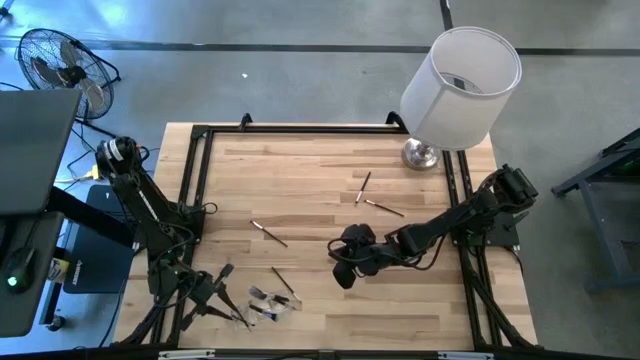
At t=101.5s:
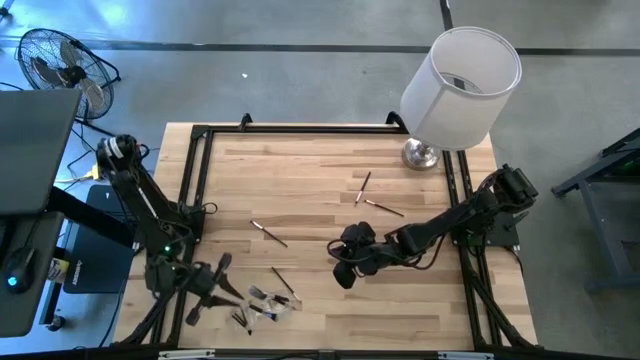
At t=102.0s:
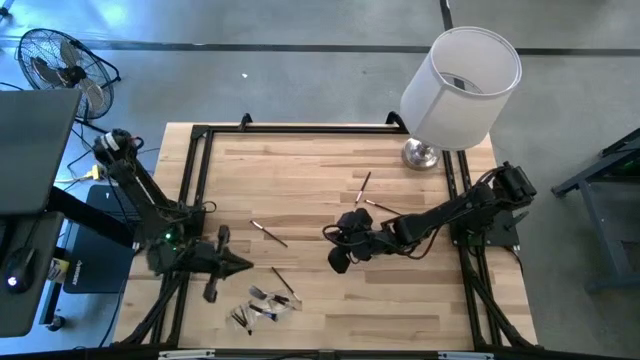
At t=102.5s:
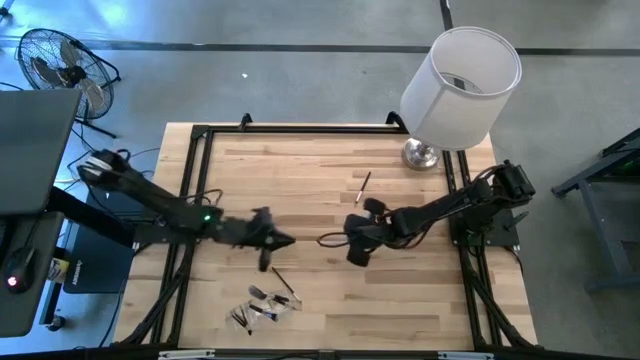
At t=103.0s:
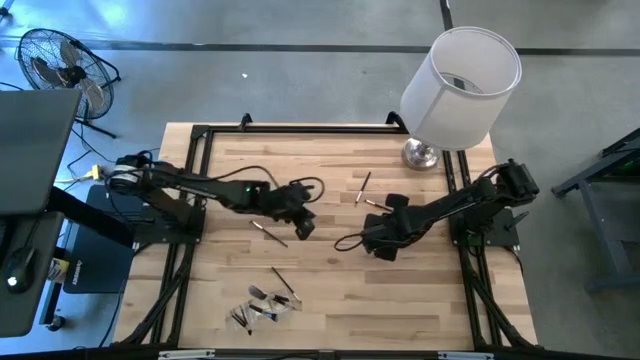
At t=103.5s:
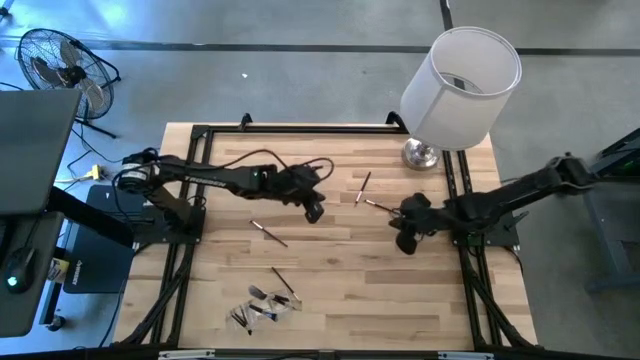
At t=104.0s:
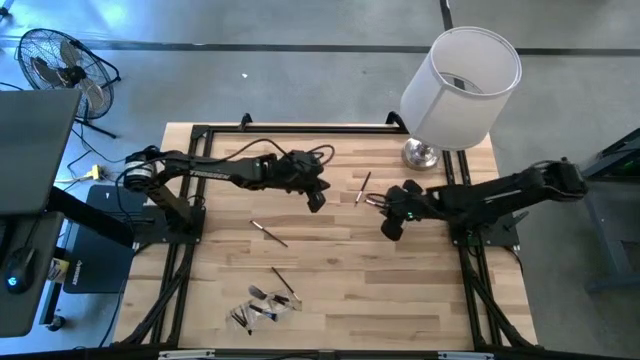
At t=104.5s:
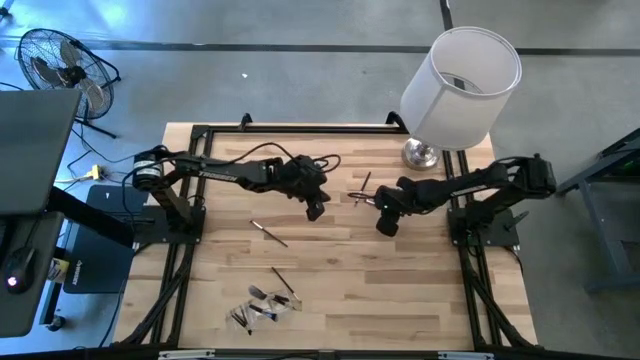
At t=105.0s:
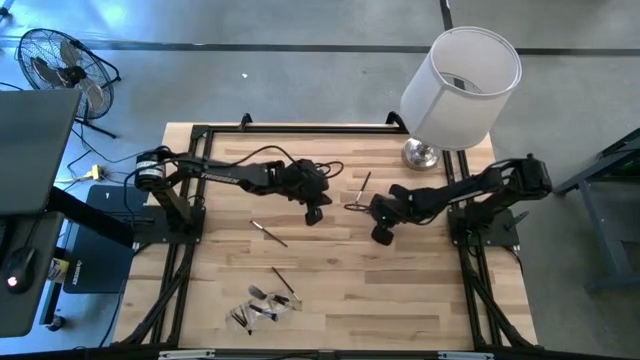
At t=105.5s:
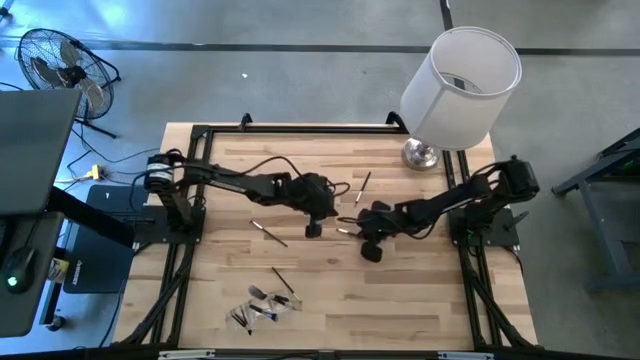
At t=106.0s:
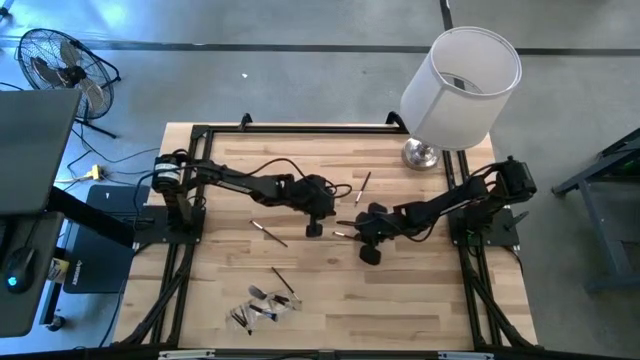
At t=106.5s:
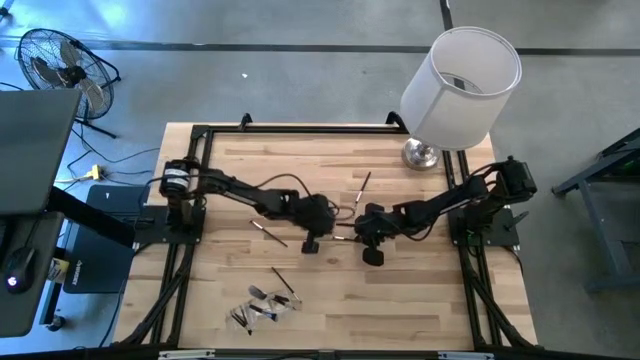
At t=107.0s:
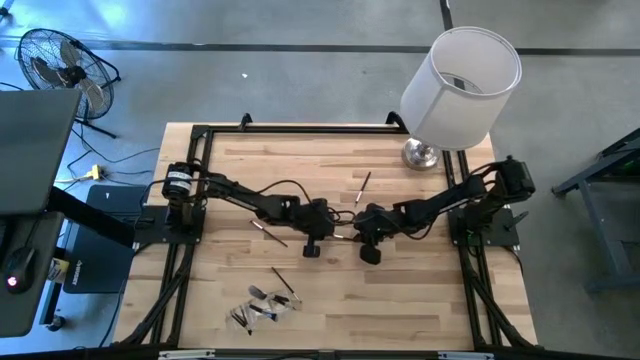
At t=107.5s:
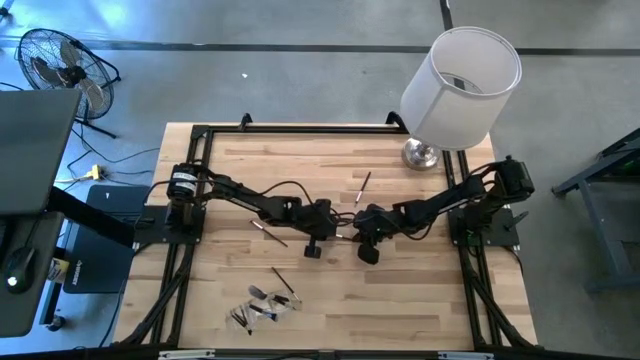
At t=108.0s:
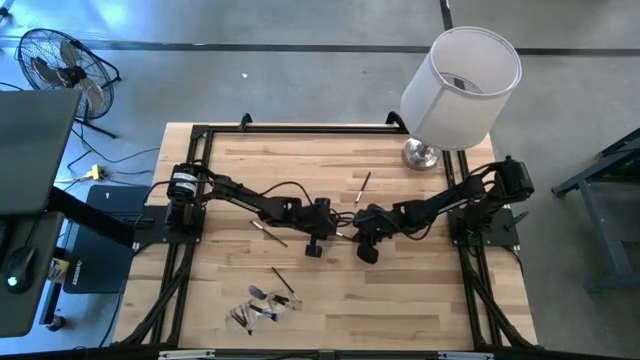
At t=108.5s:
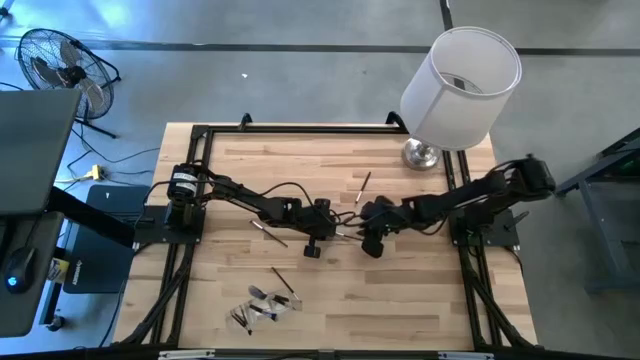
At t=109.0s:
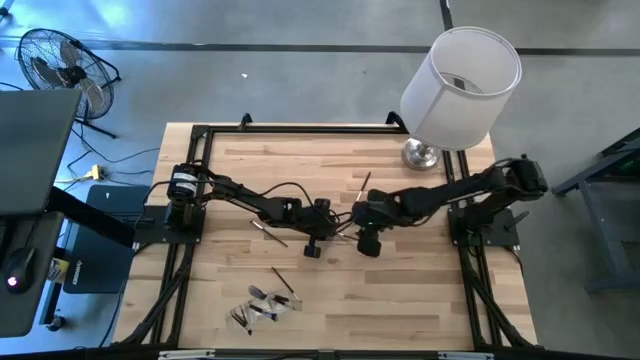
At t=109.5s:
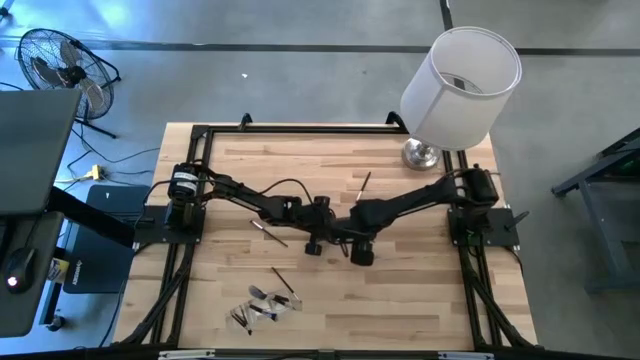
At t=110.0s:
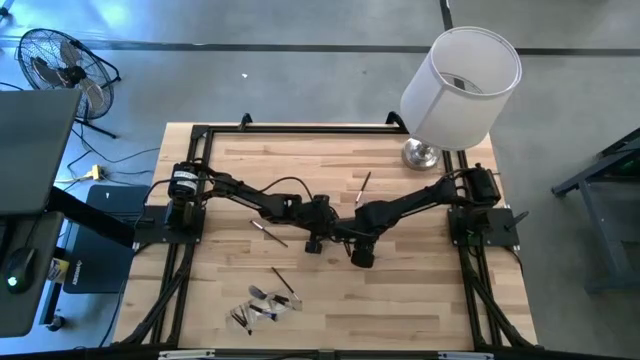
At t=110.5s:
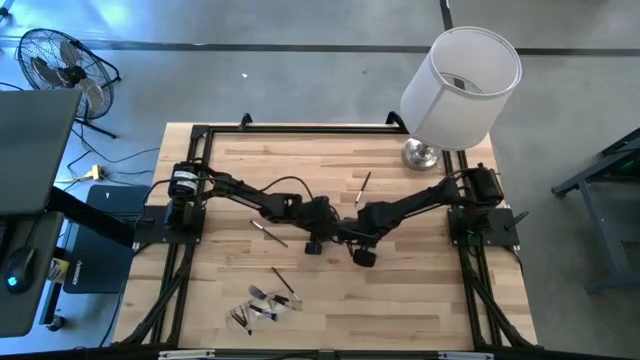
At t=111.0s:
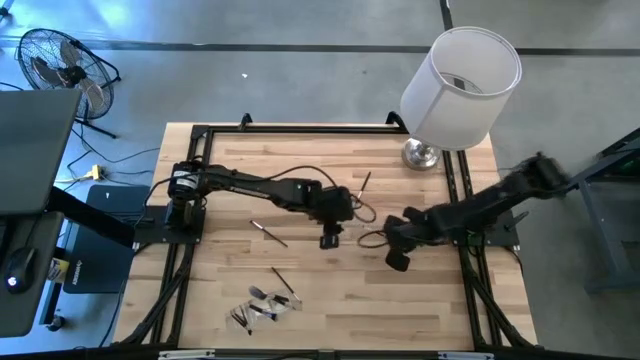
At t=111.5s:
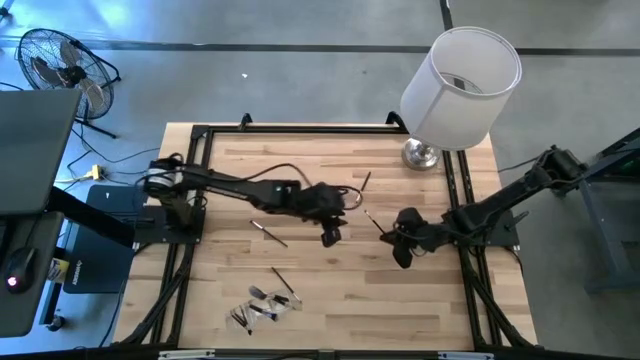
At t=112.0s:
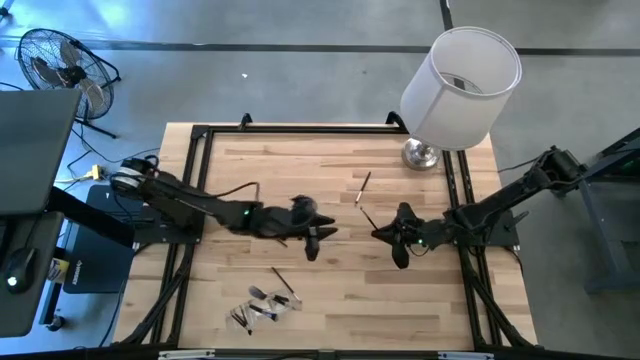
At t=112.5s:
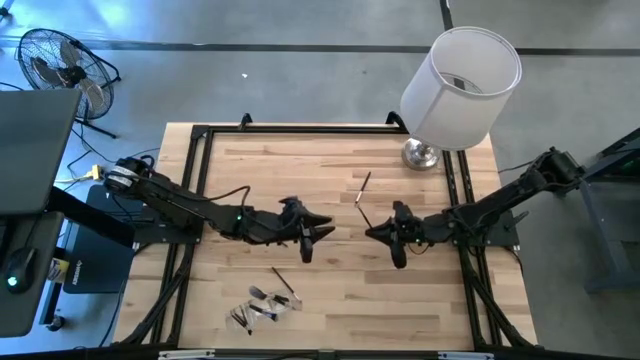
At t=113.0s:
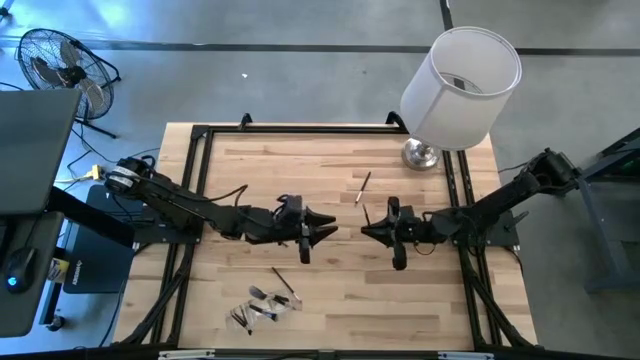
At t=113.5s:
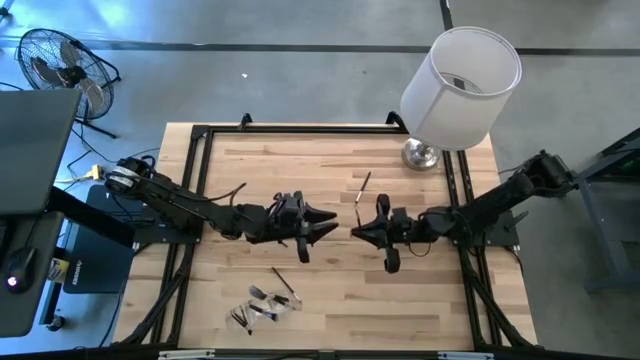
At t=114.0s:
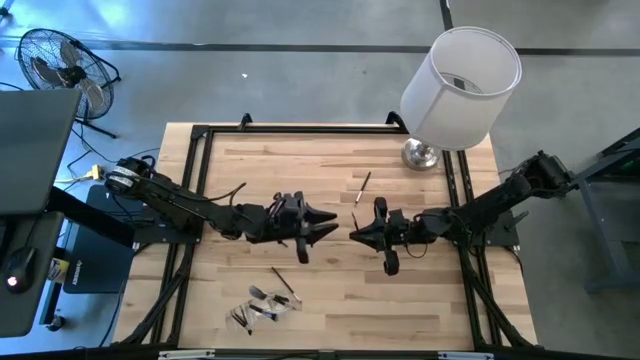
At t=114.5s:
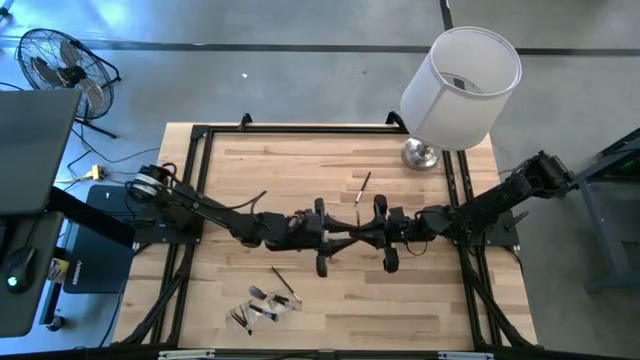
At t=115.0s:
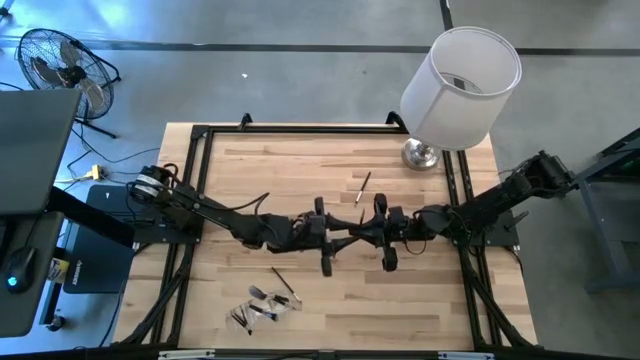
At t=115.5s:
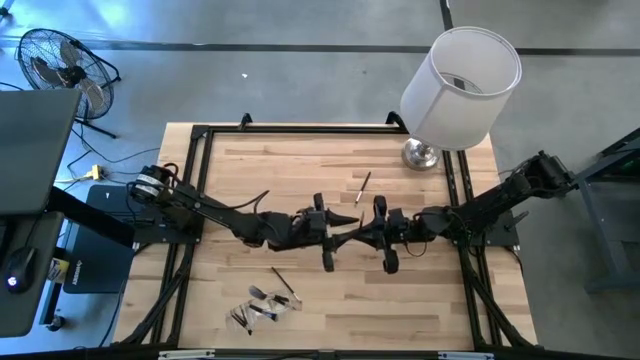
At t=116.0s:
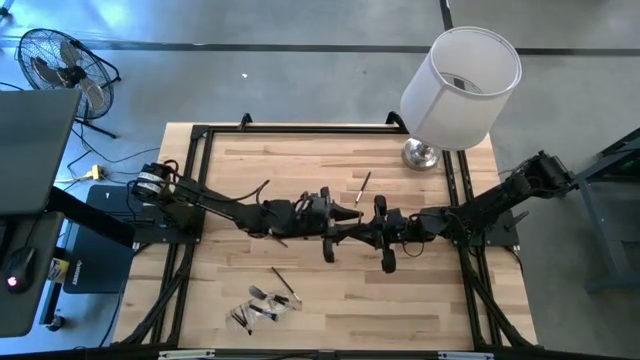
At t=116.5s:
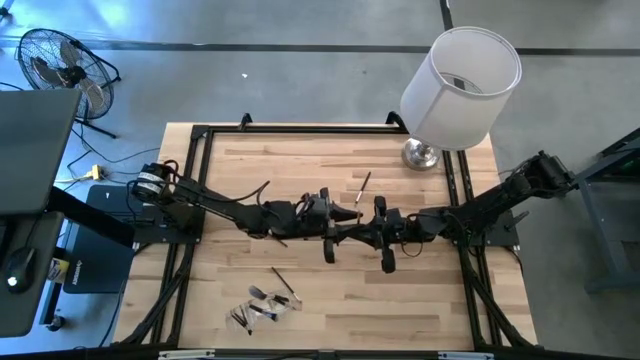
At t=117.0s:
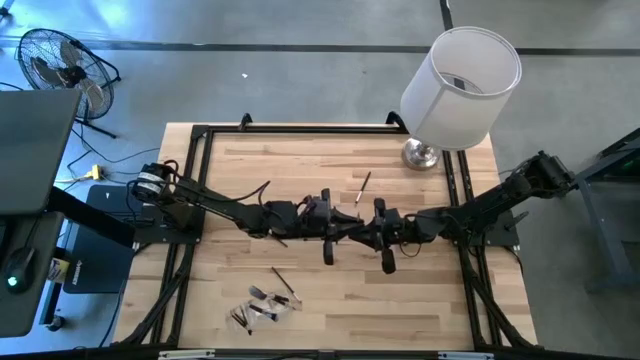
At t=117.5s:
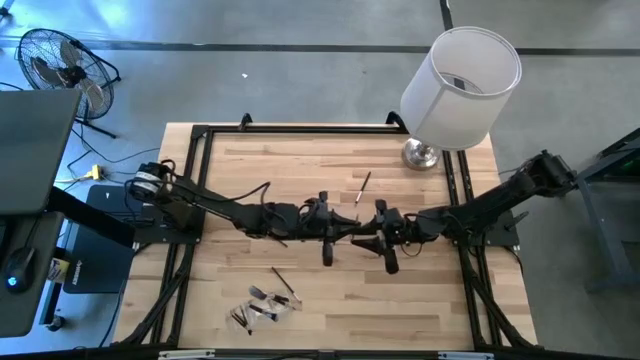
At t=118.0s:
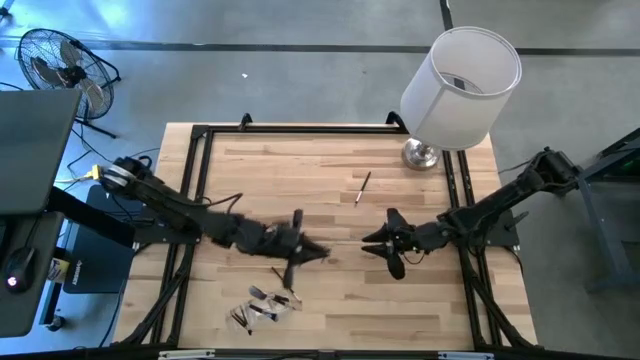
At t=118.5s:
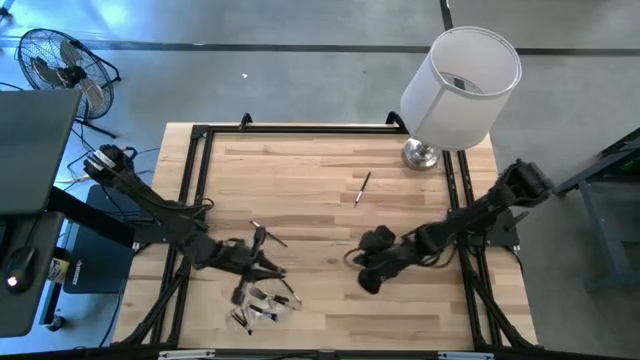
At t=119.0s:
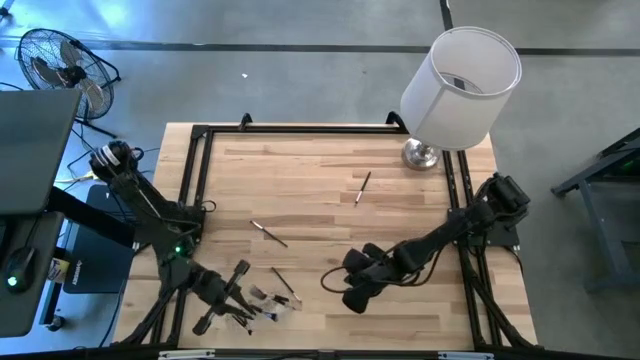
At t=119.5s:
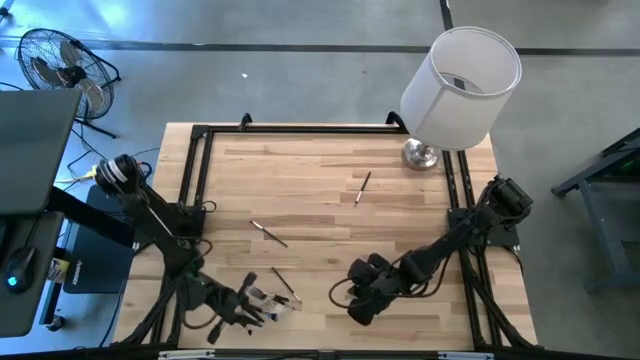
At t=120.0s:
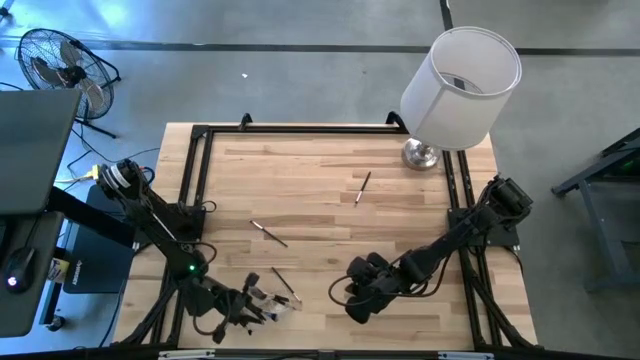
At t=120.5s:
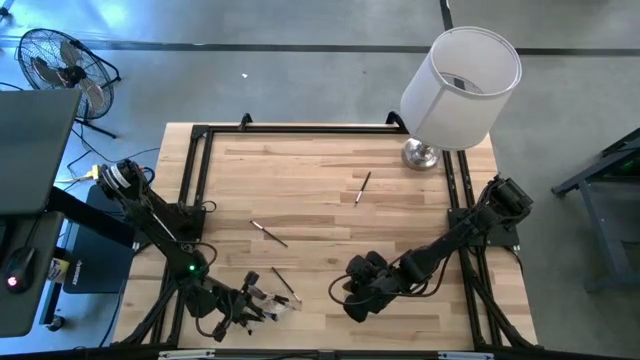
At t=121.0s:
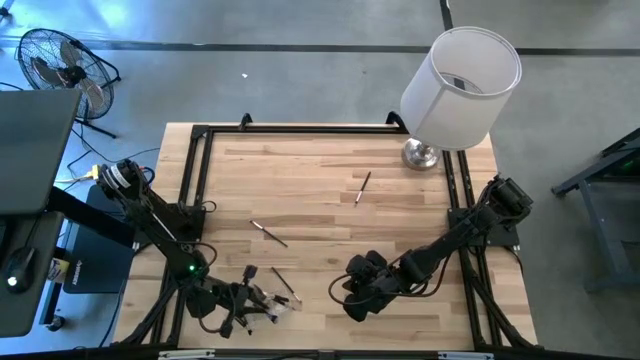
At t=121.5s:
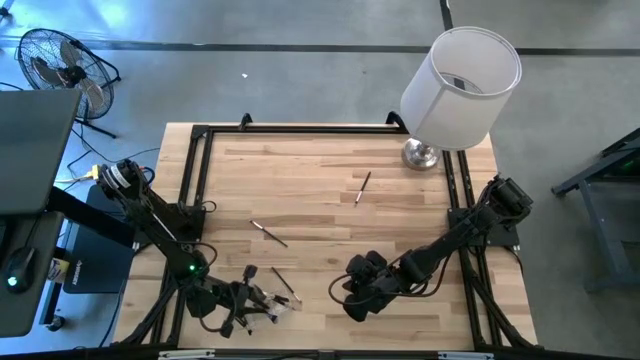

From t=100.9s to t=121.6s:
Task: Pick & Place Makeup Supplies
Put the silver makeup brush into the transparent organizer

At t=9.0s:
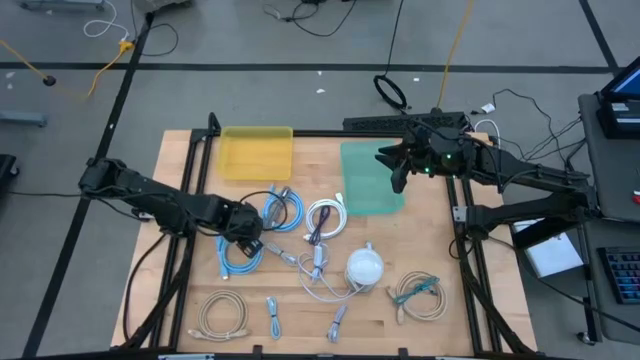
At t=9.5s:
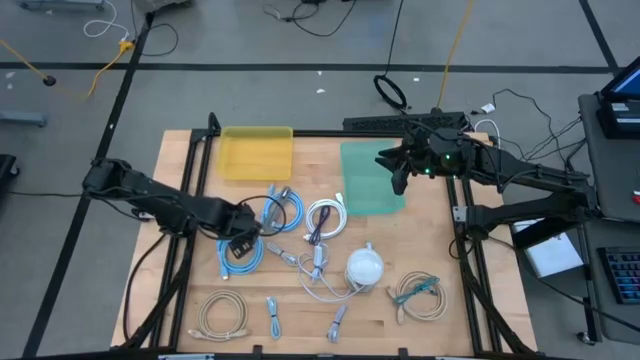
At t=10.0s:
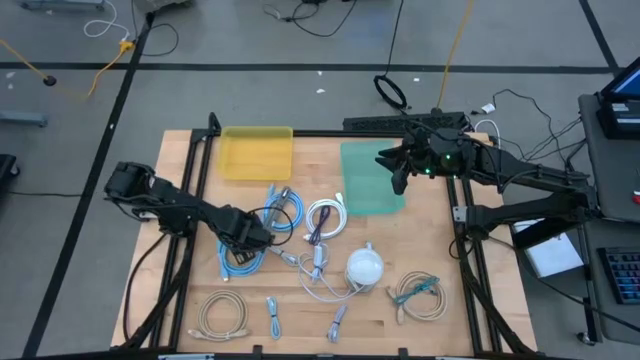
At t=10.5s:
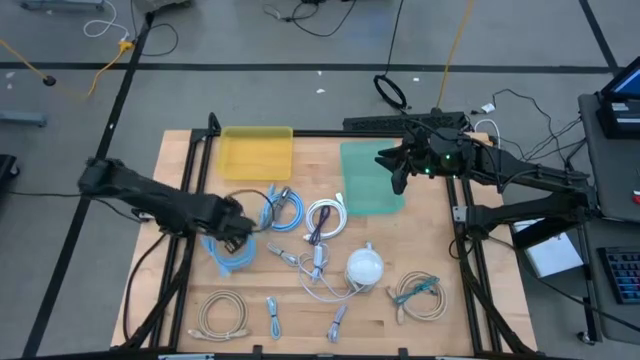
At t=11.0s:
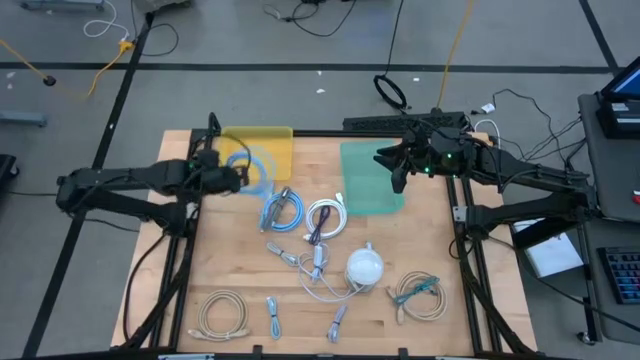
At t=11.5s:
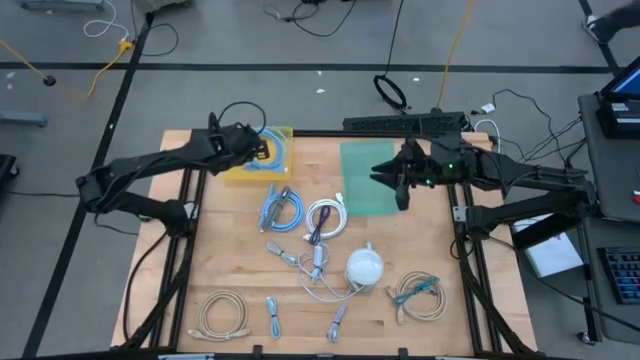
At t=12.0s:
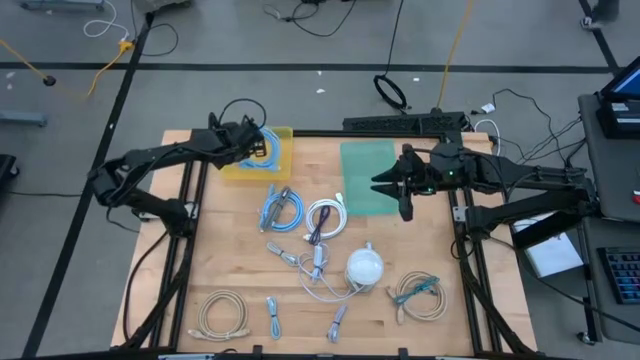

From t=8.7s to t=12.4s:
Task: Pick & Place USB Port
Put the left blue HDMI cable into the yellow bin
